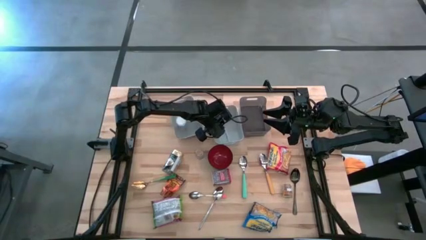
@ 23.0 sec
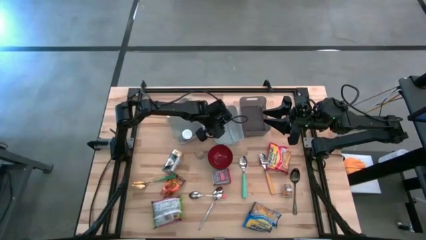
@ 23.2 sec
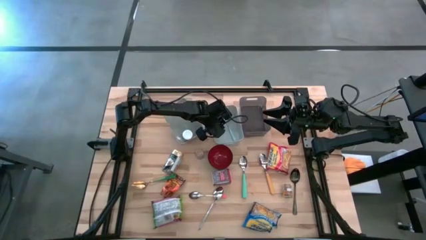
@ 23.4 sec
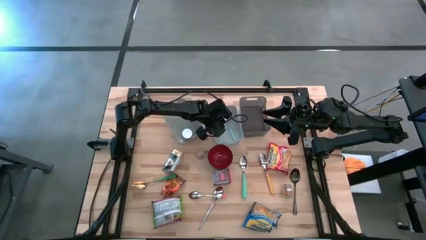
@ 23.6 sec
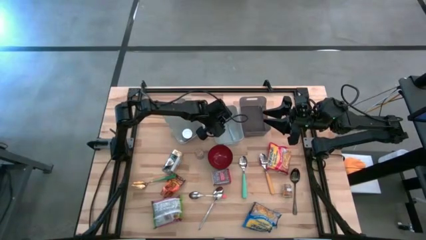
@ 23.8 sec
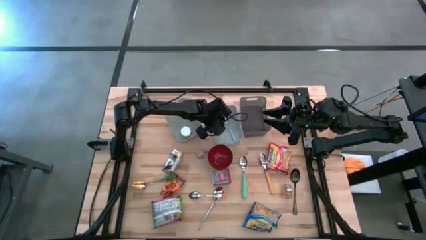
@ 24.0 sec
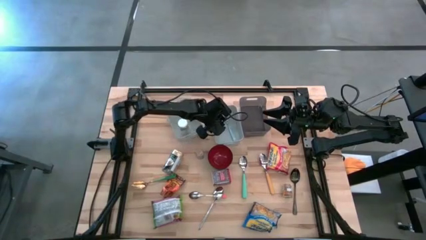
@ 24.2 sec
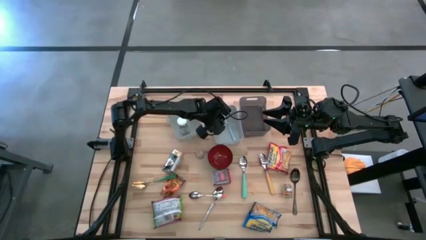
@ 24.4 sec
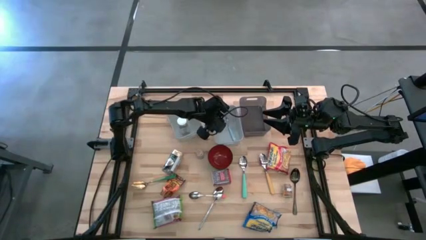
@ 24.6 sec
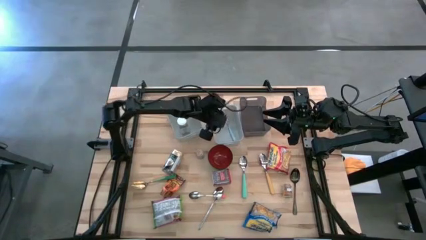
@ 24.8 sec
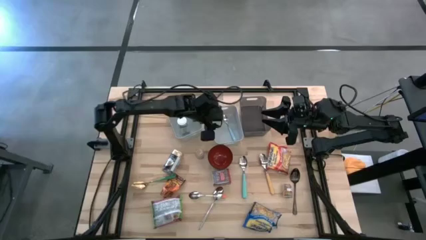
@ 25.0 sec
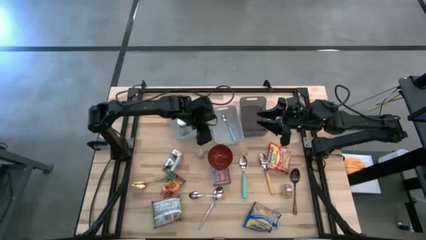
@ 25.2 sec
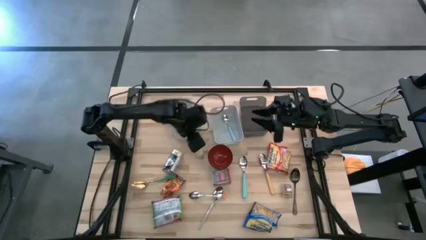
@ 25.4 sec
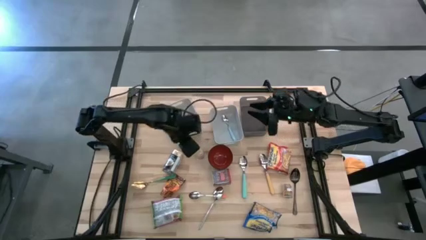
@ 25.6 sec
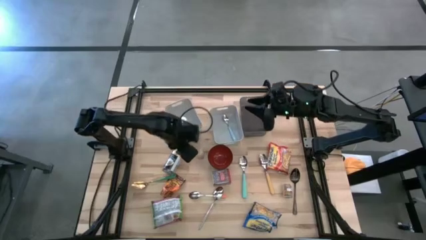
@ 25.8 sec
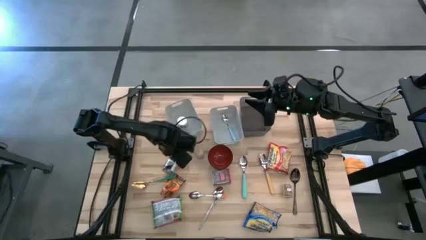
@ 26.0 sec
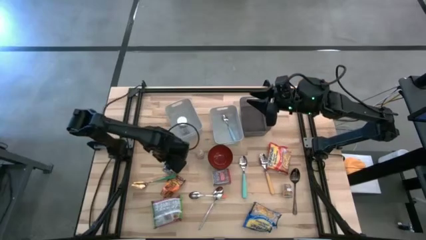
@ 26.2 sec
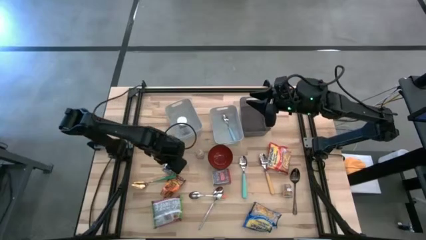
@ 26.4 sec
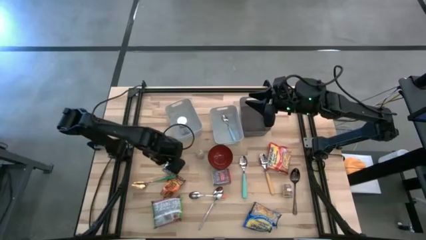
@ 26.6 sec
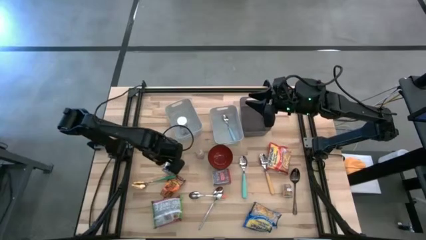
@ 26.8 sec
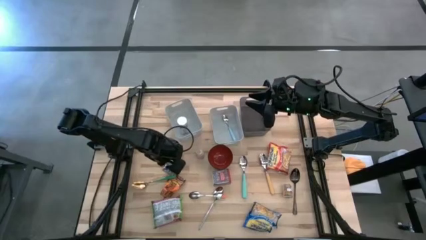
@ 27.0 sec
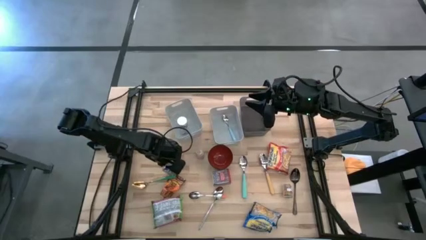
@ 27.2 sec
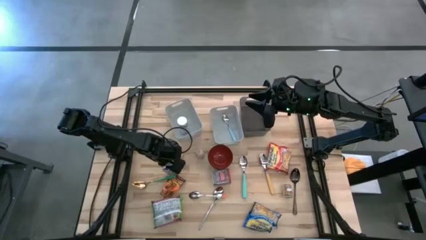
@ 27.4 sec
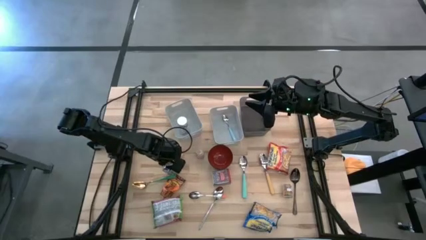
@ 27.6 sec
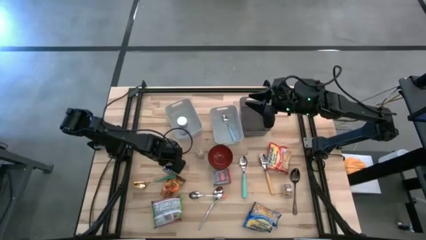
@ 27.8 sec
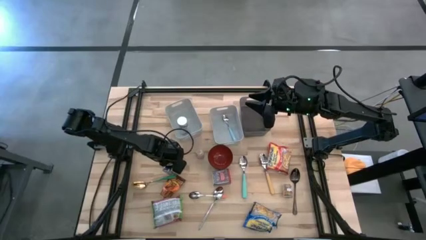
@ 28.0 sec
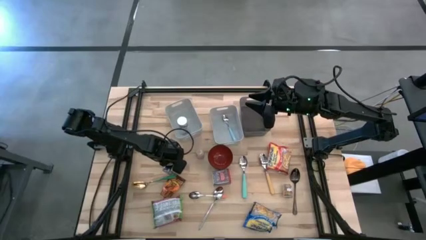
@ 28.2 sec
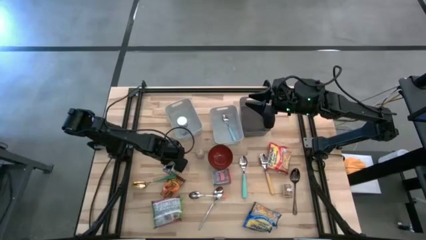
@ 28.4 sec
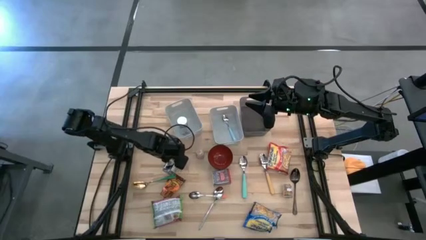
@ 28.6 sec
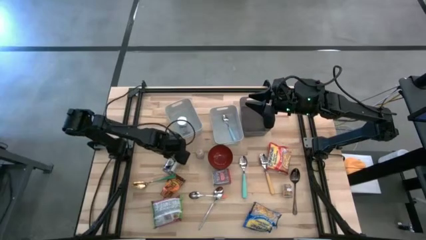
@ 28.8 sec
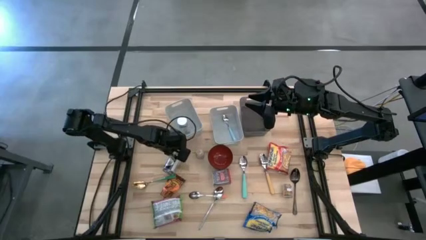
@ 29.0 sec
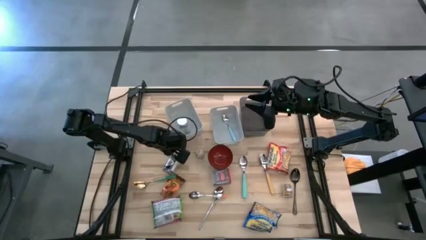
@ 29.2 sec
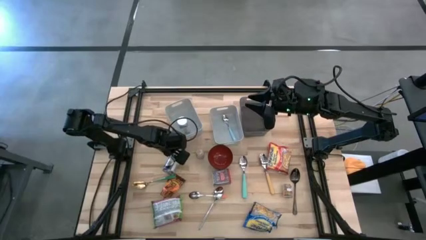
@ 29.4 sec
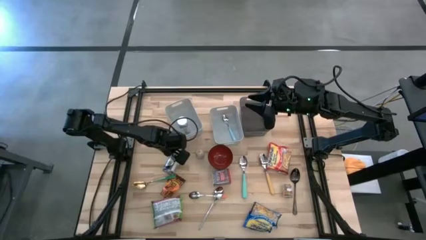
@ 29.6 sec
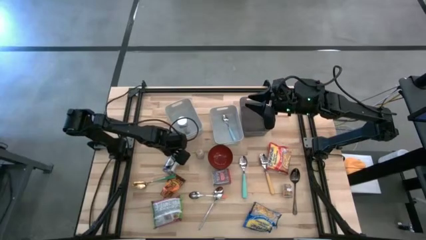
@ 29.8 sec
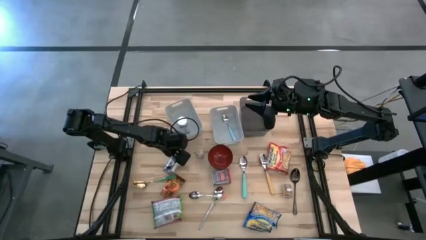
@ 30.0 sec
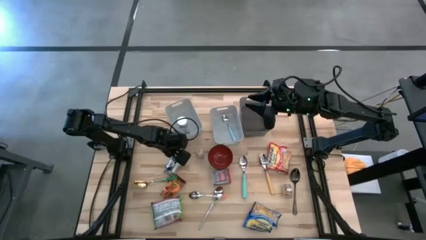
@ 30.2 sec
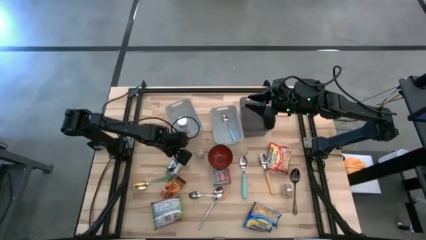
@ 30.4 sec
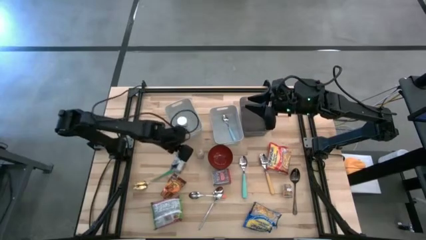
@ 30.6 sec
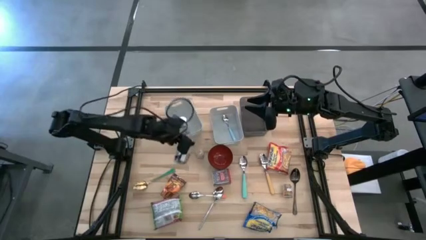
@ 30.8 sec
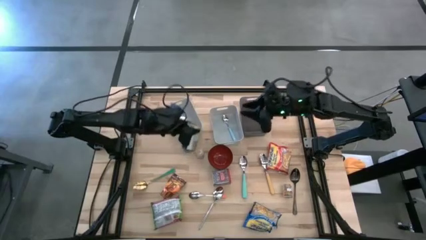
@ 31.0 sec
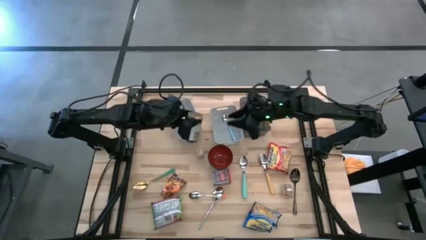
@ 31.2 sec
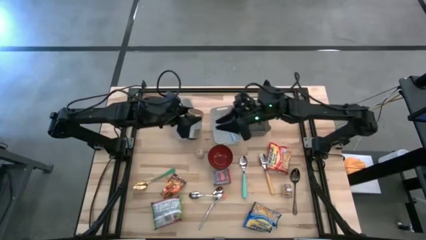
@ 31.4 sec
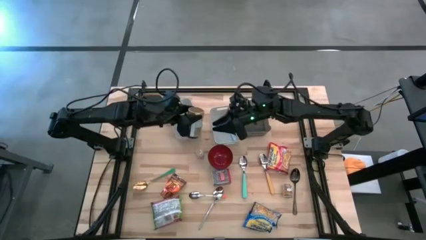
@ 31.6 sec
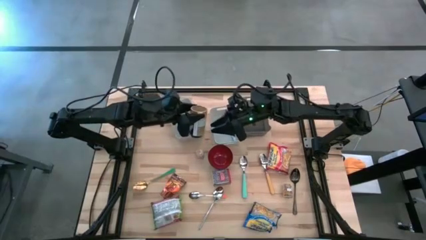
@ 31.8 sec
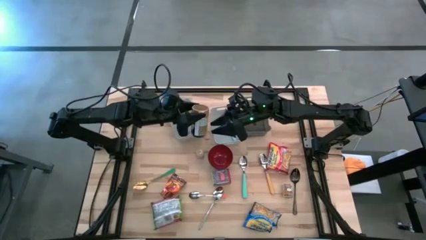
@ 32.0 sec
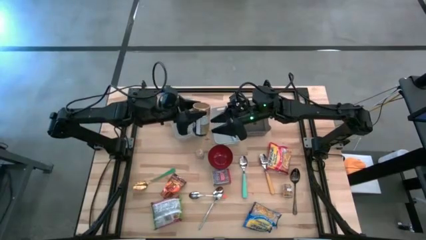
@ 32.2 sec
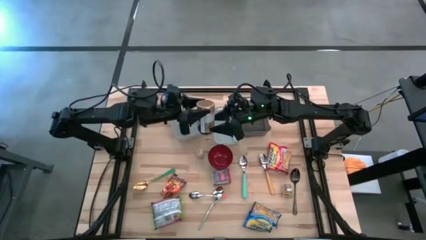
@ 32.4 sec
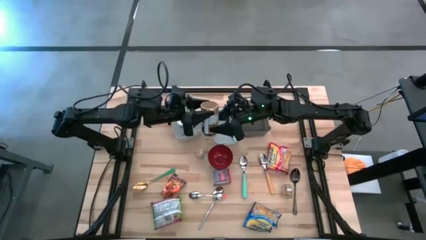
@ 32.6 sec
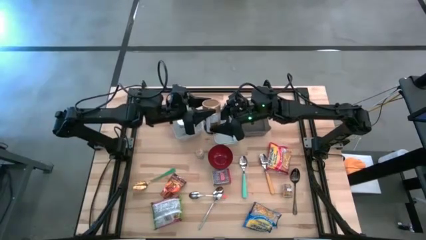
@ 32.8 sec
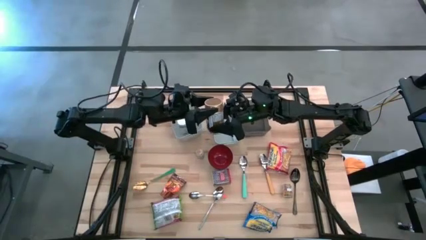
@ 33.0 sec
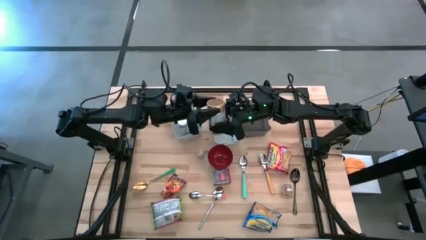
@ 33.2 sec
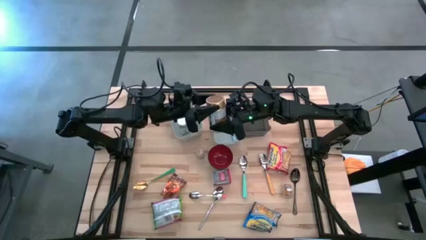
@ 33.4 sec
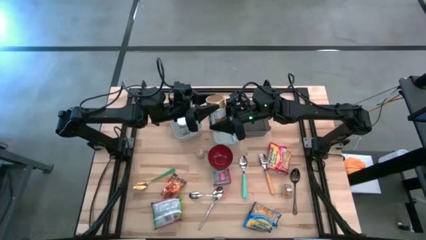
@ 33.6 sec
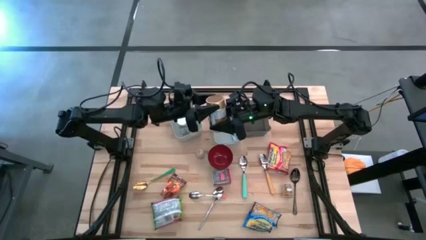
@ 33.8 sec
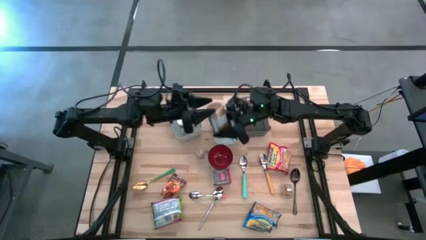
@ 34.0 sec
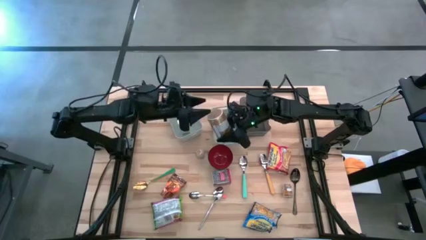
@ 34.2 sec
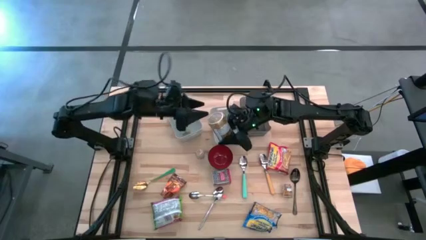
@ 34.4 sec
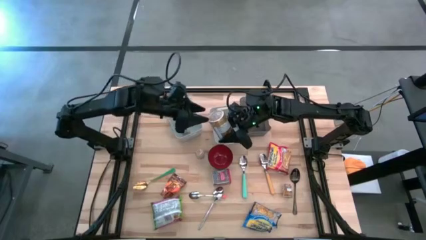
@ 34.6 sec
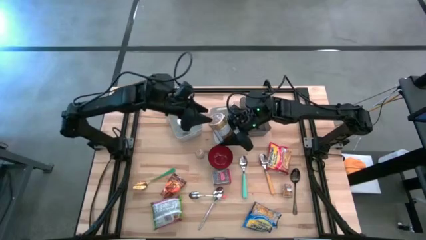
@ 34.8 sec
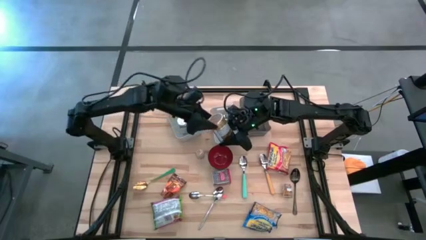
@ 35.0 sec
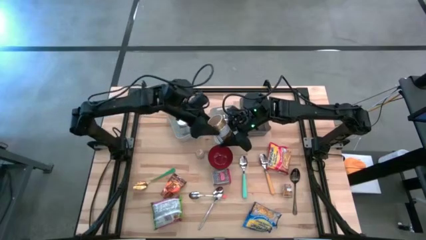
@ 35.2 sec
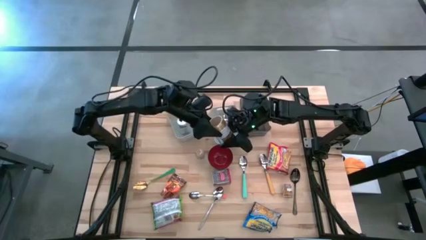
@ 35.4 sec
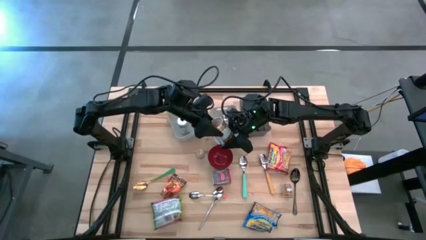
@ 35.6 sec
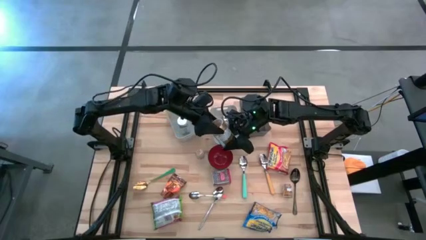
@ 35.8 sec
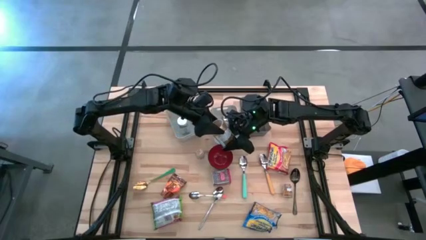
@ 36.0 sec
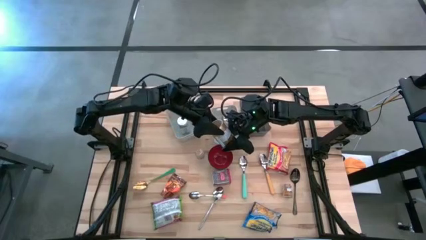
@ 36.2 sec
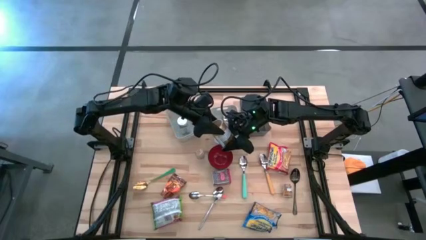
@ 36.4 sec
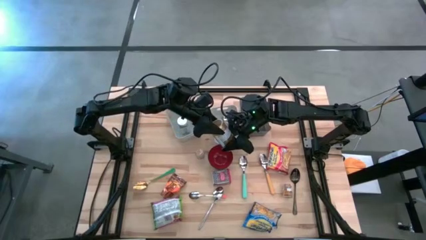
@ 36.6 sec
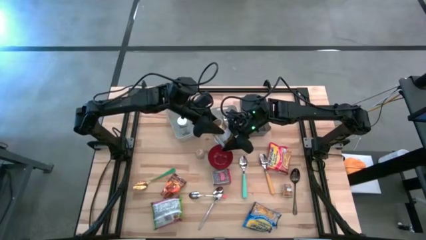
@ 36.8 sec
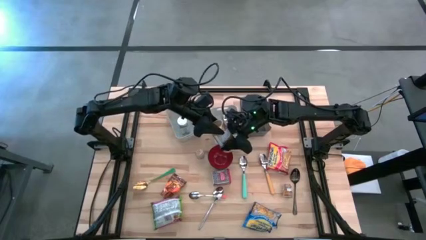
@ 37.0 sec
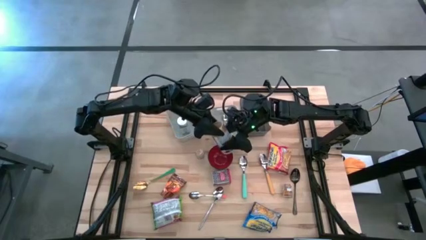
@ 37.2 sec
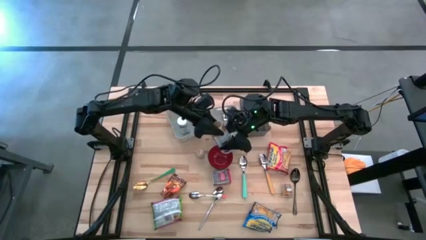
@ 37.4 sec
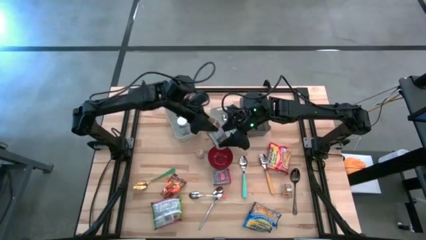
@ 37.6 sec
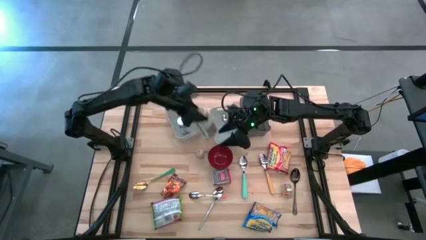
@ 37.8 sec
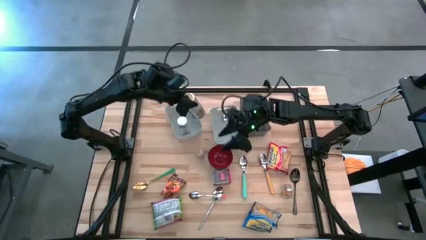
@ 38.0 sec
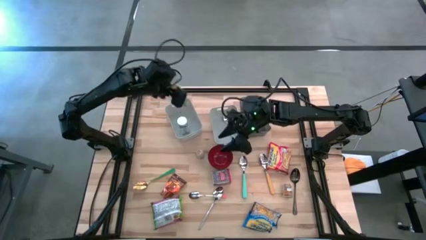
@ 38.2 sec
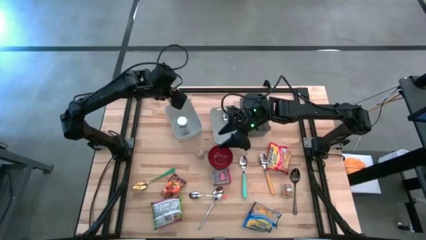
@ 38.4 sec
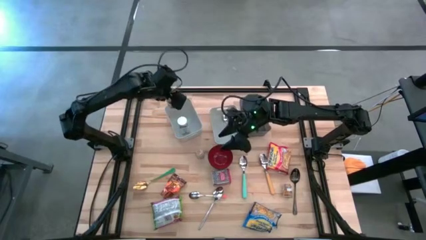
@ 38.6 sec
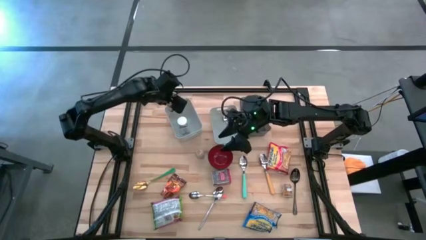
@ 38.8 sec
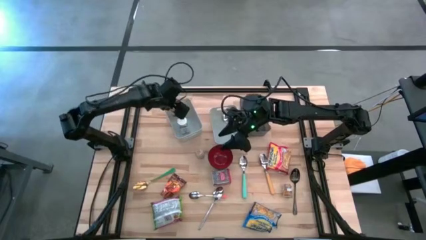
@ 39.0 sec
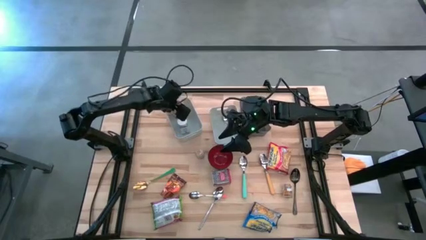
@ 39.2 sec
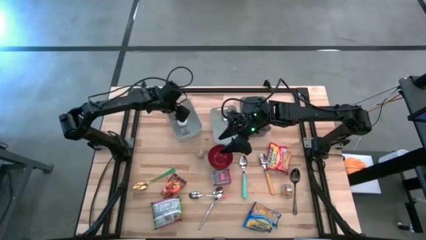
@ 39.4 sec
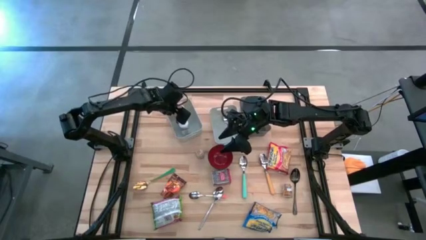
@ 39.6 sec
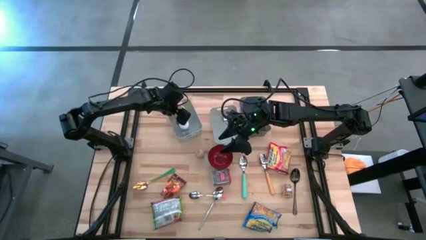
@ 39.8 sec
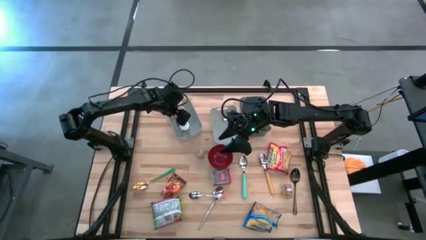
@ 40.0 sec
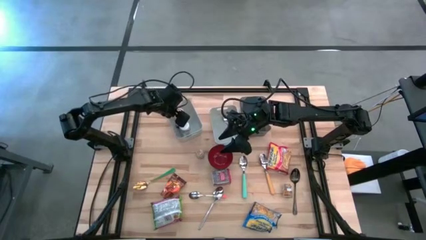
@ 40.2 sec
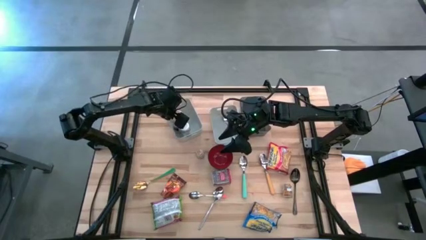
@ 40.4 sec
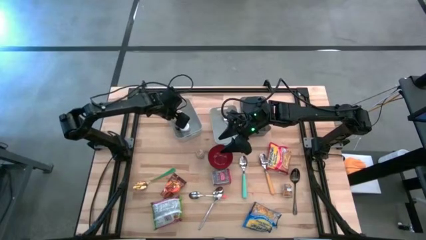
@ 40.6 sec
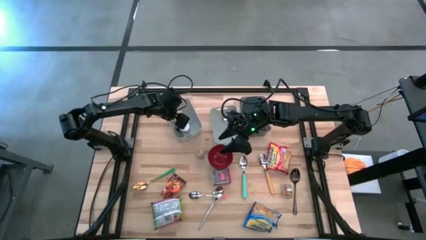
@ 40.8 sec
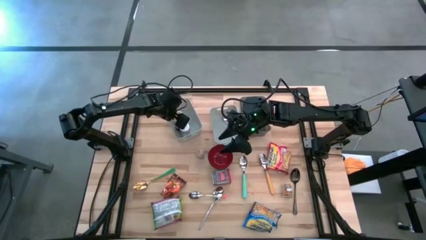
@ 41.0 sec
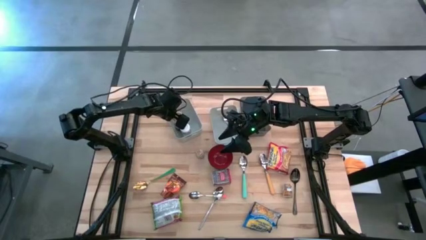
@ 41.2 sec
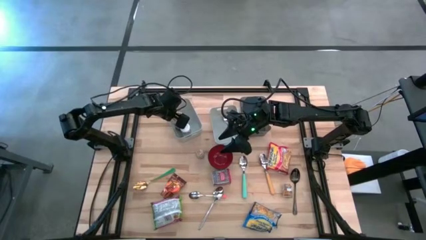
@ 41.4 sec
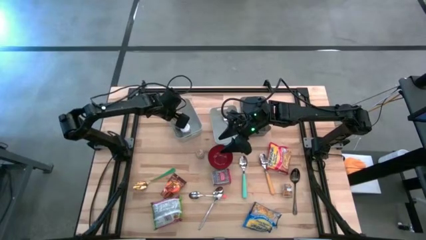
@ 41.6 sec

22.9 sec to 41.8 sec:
Put the gold seasoning bottle into the left white bin
